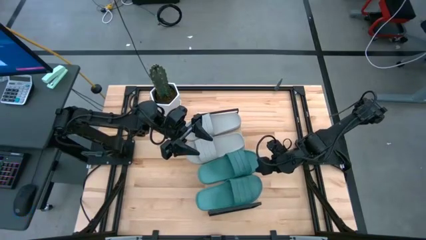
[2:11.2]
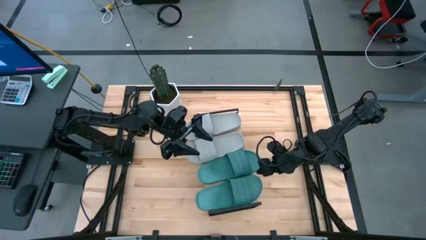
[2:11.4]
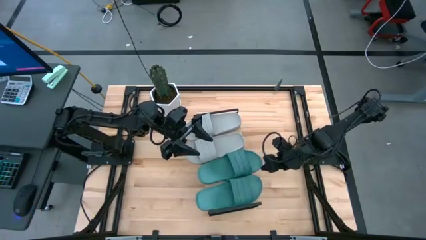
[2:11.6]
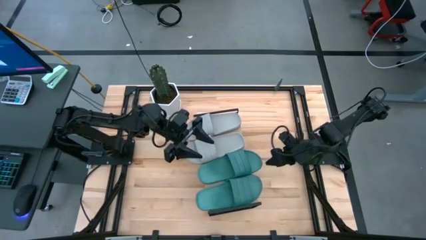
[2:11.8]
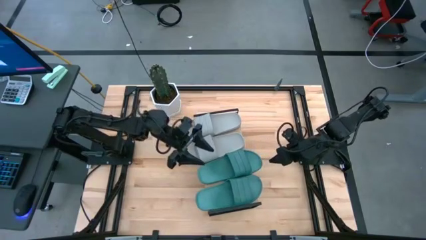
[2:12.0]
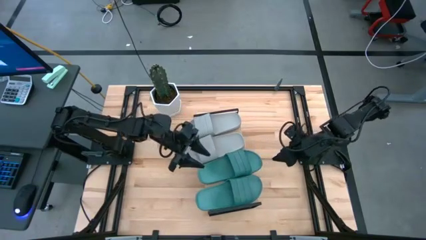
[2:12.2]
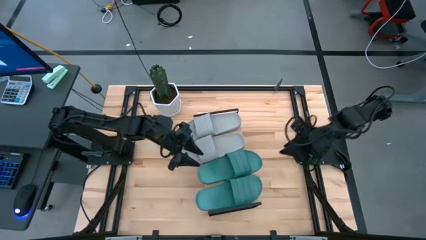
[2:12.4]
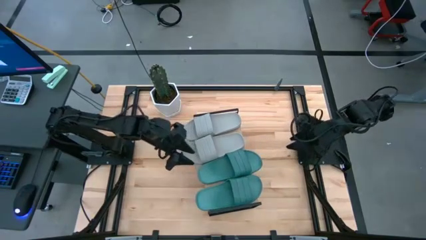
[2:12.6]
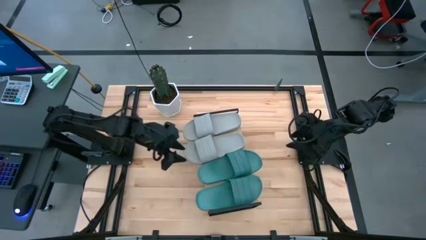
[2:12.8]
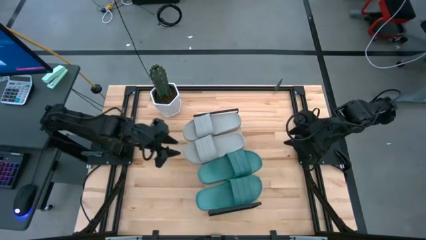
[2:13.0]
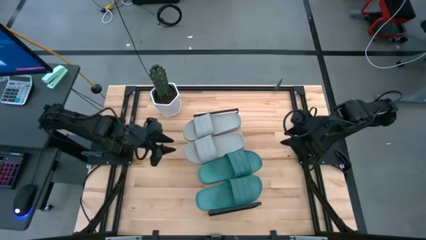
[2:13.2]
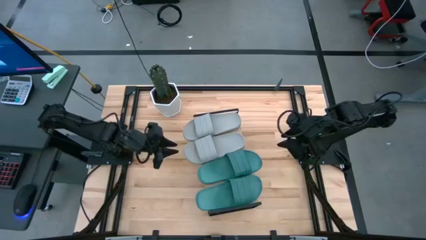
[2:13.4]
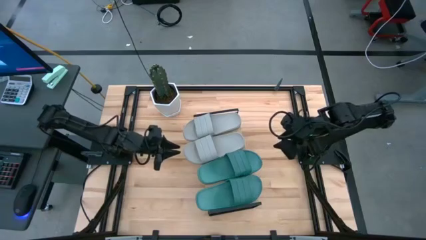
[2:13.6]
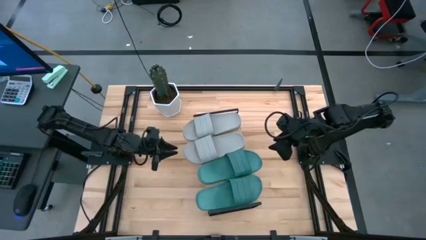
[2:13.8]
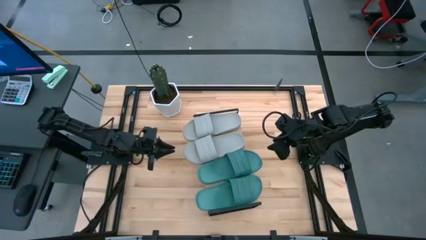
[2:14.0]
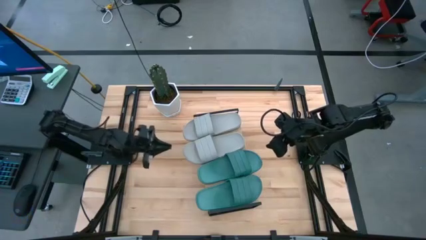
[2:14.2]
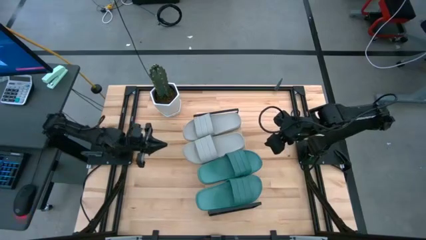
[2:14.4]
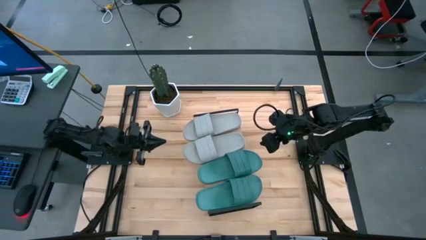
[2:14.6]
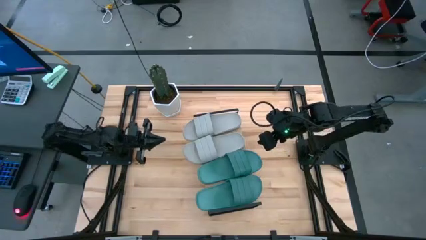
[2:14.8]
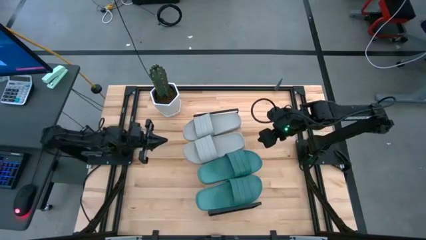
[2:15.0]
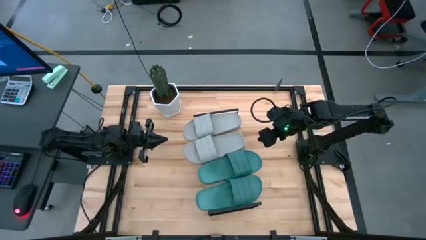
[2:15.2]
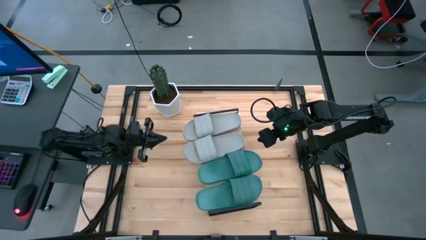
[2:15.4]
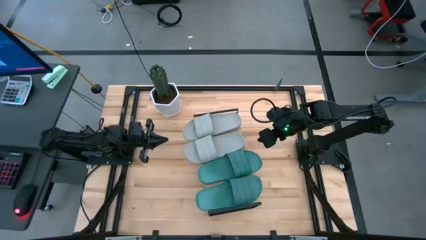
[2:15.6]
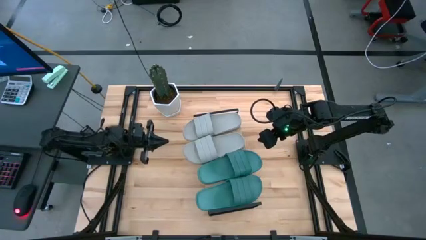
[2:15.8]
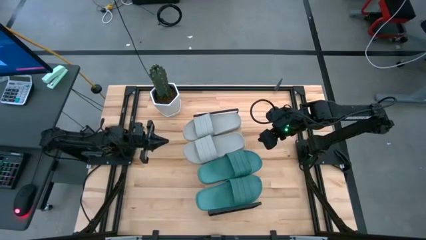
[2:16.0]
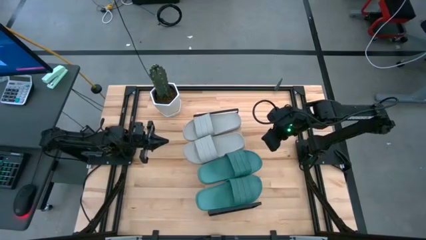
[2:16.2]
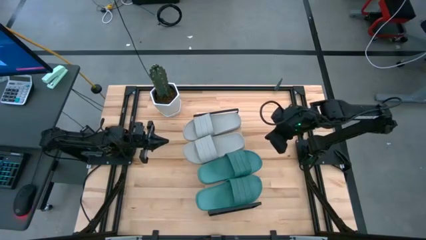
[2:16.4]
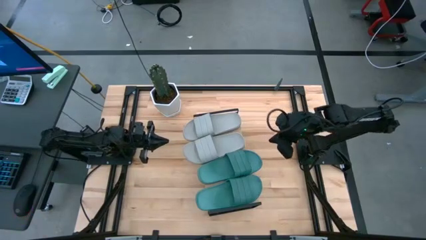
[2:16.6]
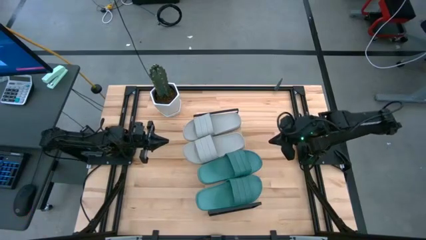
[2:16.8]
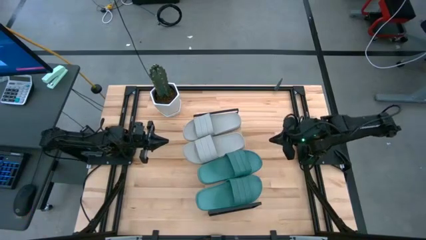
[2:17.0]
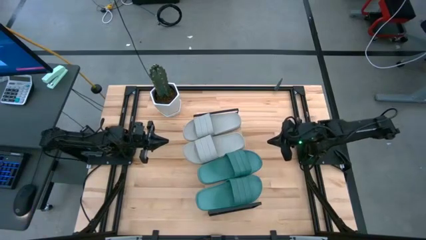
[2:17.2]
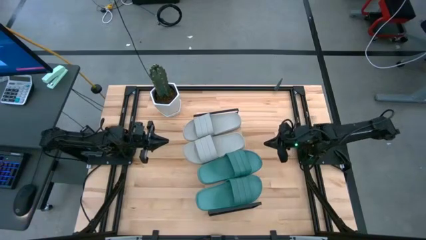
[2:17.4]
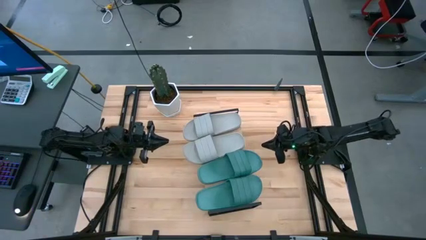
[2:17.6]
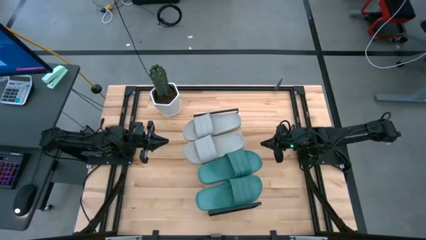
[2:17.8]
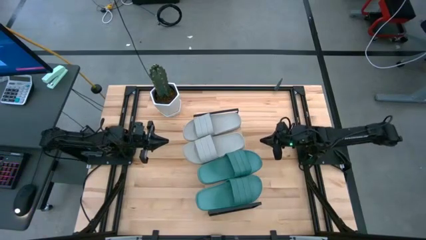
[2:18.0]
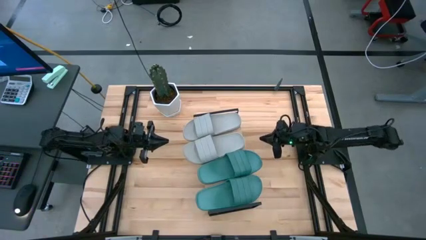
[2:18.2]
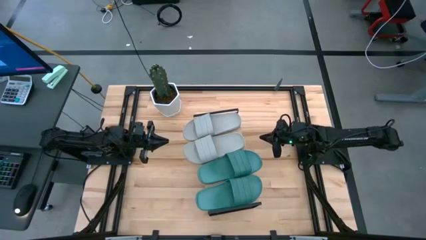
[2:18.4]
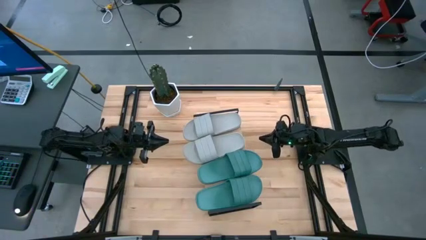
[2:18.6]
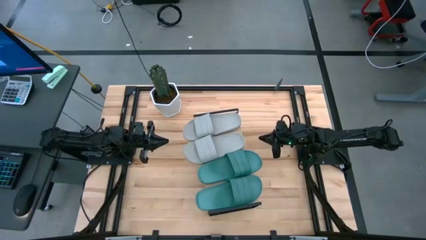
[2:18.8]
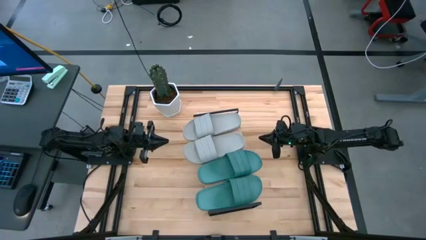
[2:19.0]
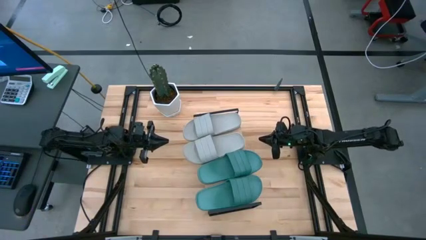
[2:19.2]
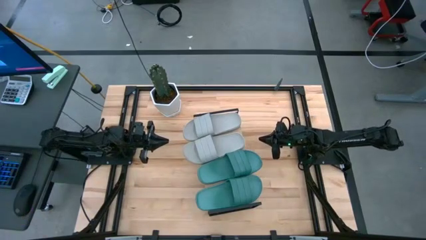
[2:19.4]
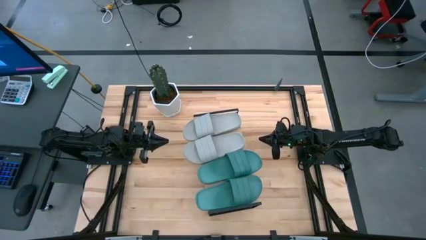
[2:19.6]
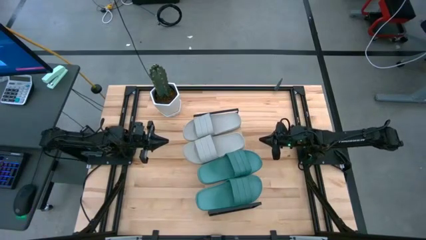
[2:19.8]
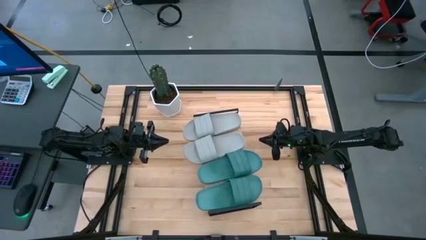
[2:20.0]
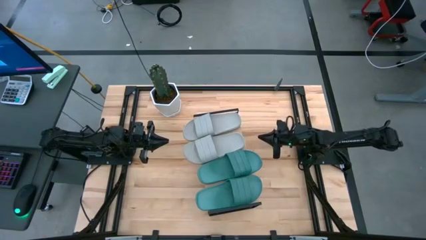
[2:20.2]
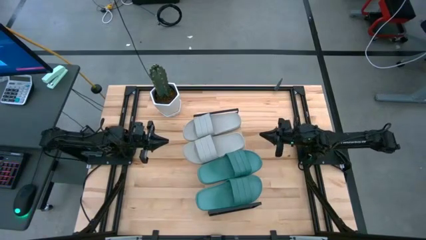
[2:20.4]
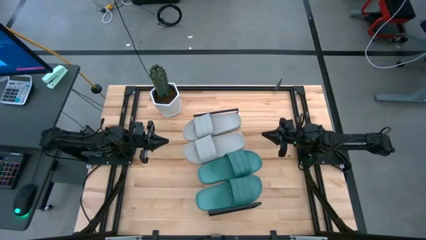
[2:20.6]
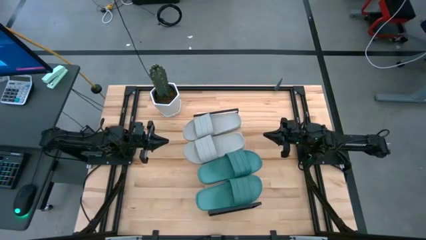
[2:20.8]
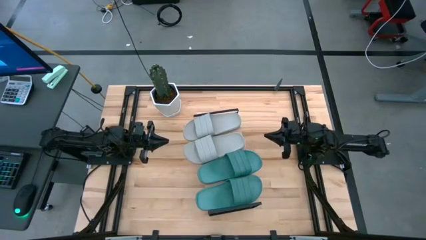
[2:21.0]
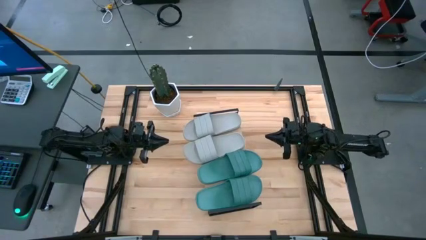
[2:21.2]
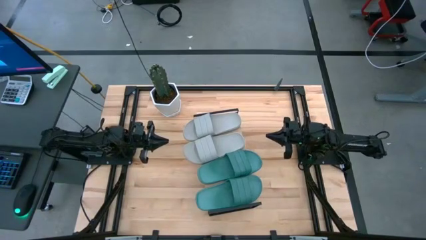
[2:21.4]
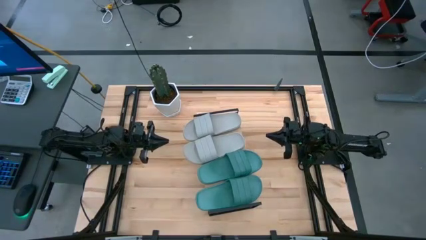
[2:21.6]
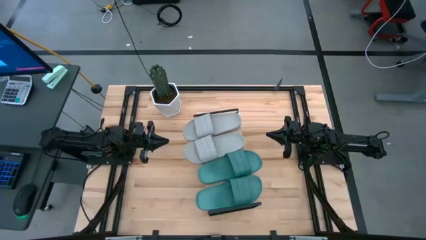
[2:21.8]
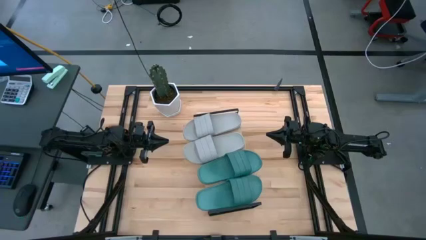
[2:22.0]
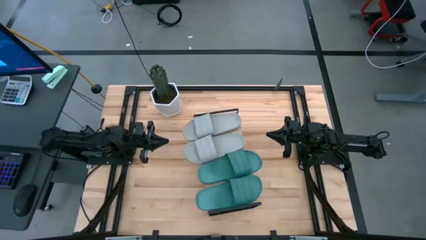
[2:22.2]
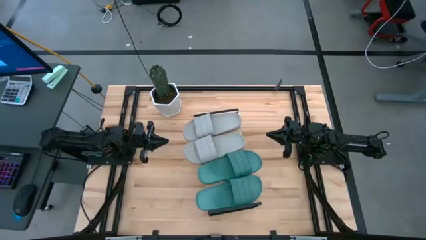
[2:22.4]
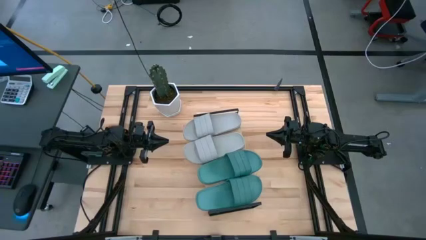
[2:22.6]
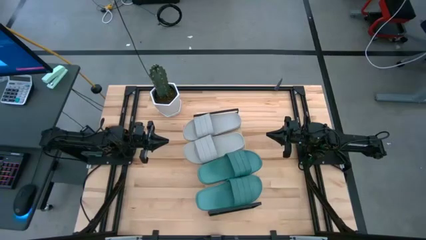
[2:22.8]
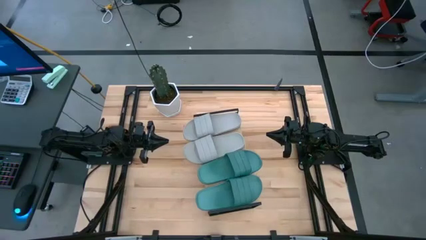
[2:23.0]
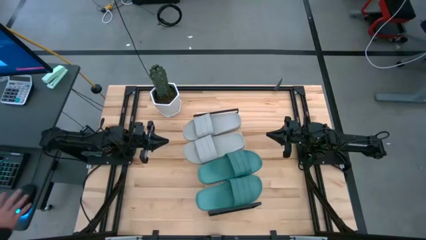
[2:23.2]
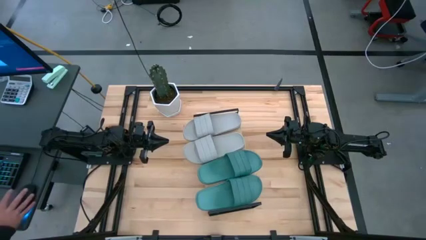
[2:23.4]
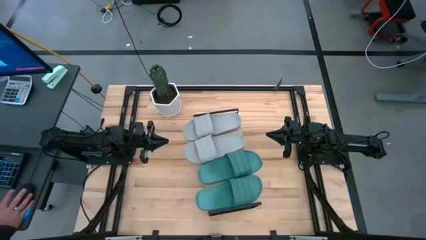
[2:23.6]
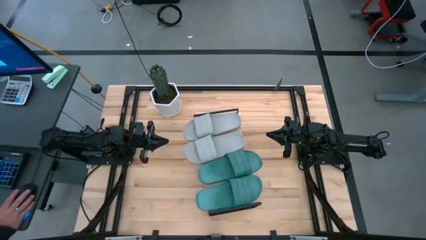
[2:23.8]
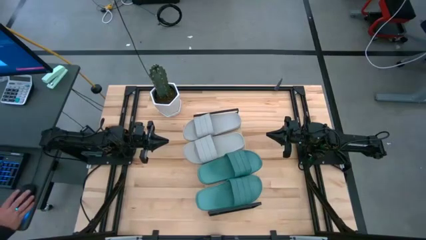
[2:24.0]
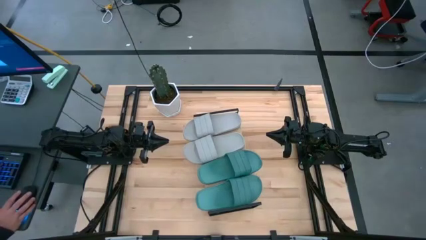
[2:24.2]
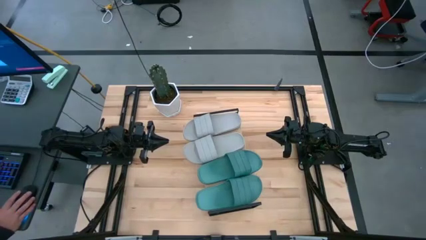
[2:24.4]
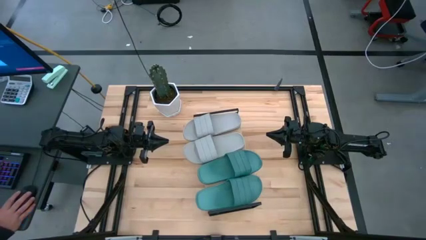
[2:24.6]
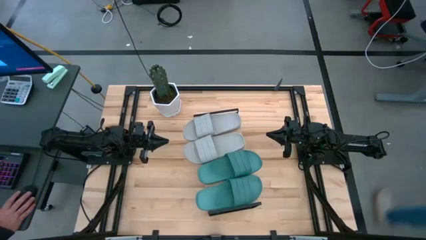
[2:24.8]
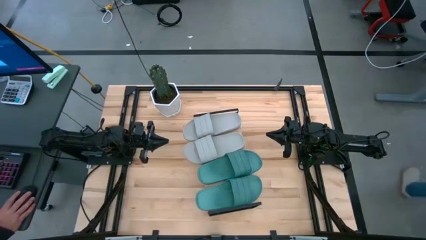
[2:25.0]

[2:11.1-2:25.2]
Task: Pick and place slides into the shelf
Return to Home Position

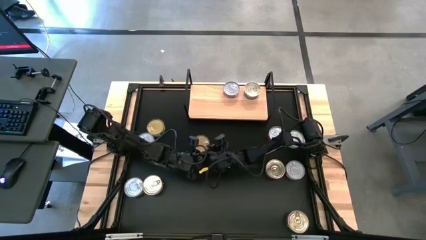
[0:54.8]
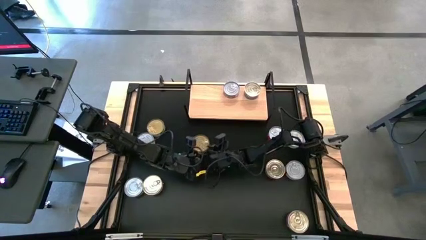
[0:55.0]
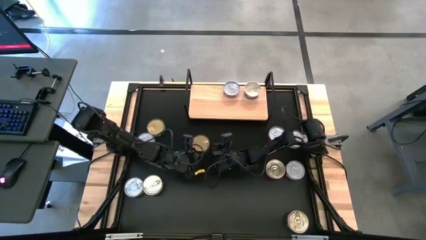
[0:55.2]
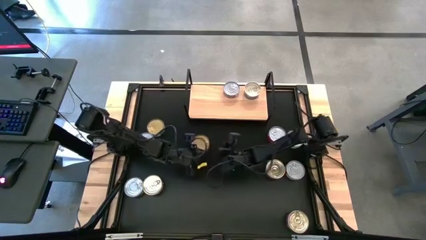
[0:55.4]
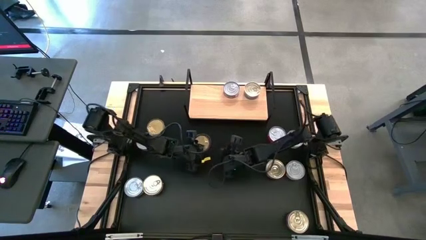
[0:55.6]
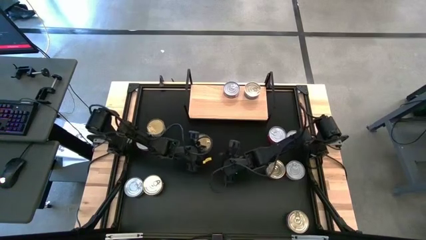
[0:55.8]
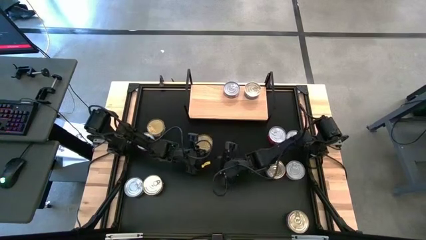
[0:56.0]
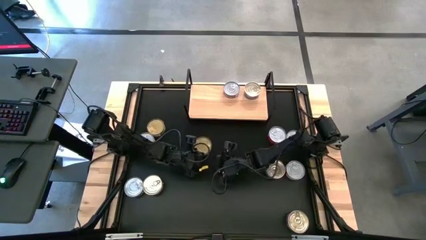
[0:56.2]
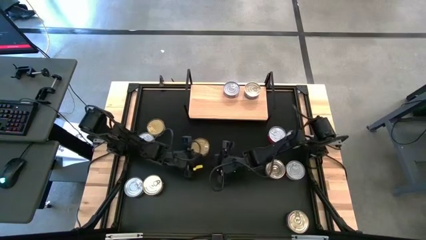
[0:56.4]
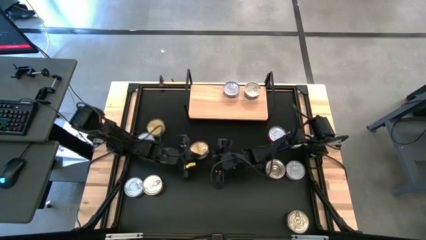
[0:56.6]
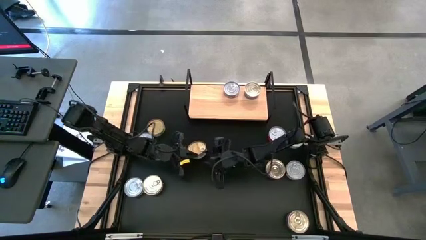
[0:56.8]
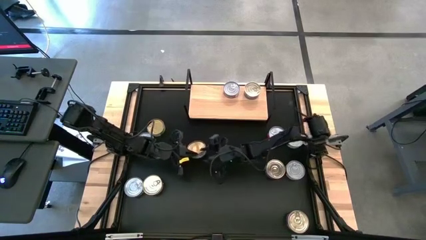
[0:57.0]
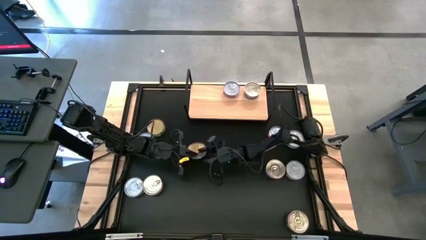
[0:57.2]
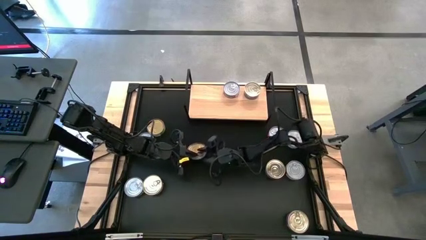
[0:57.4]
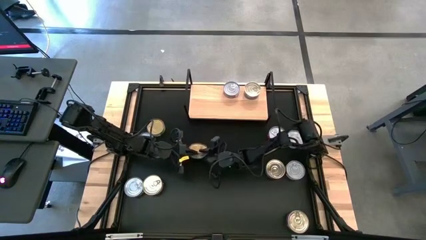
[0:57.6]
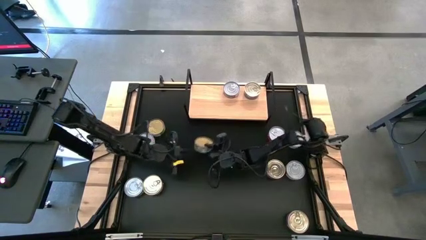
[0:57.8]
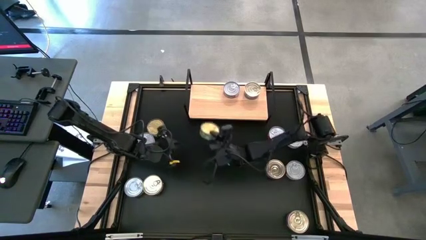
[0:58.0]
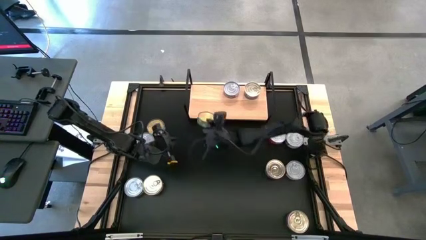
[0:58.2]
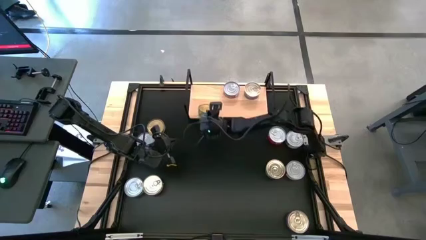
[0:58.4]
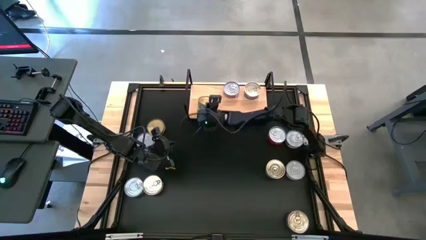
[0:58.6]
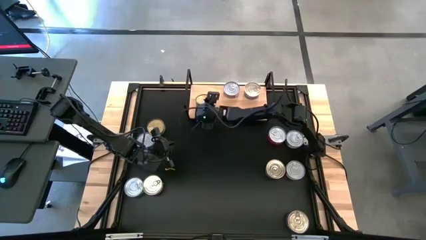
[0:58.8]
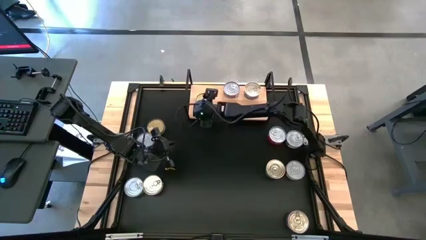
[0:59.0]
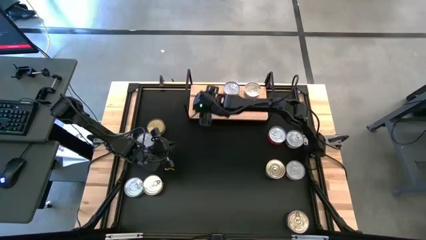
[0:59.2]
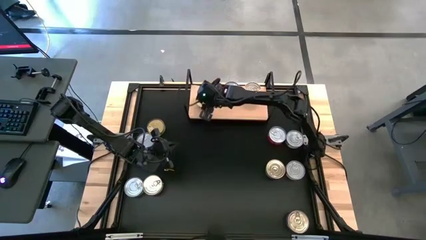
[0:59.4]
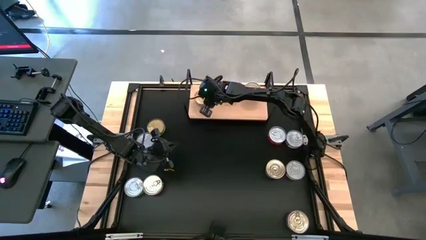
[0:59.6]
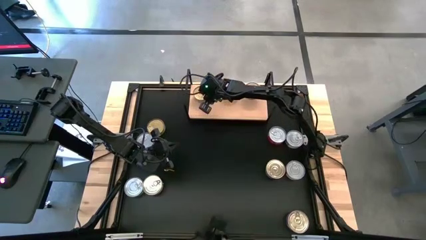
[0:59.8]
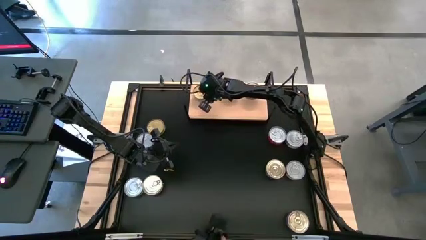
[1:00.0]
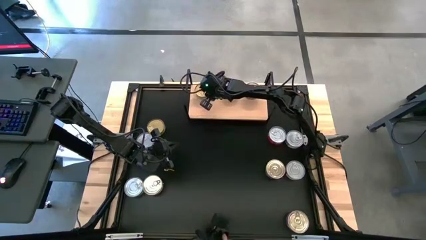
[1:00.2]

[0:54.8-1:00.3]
Task: Stack canned seafood by type on shelf
Put the green tuna can on the shelf
